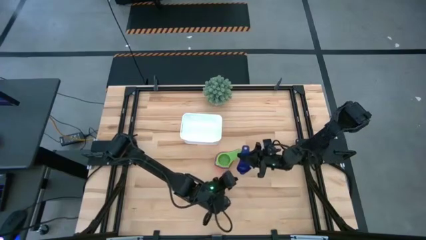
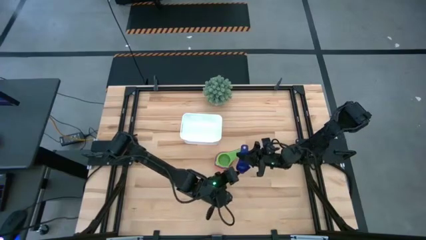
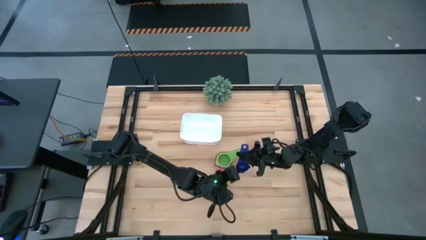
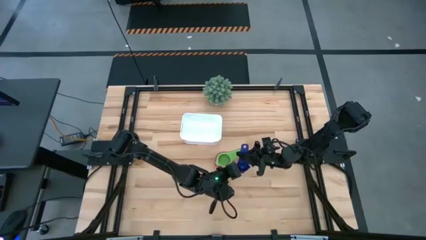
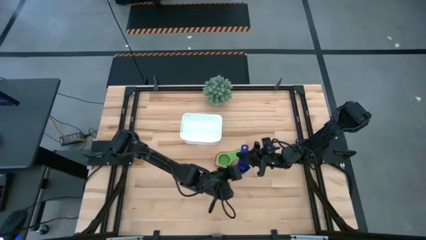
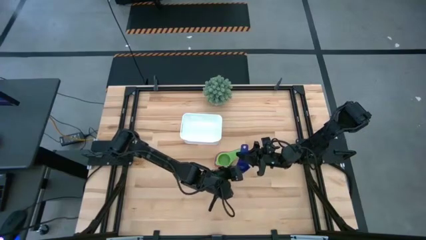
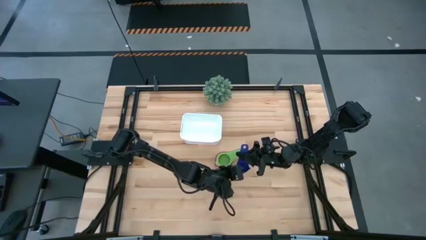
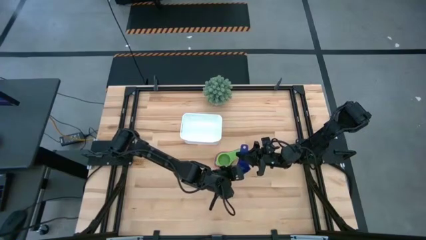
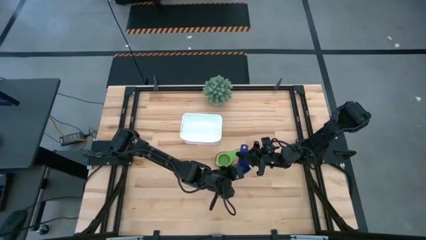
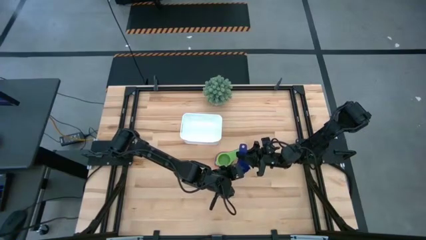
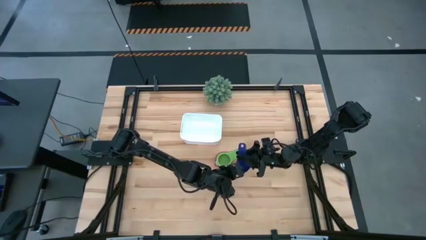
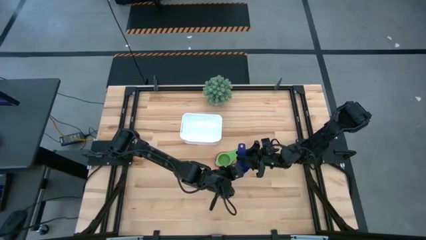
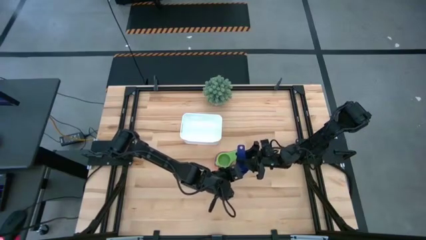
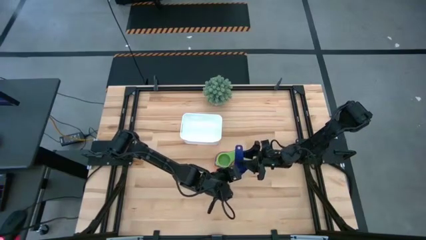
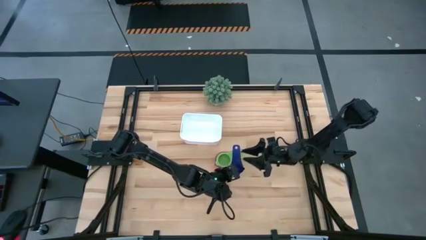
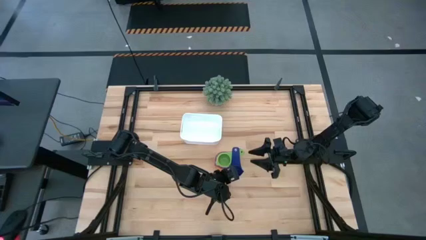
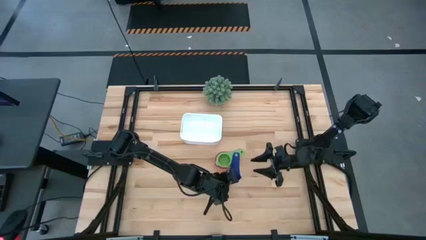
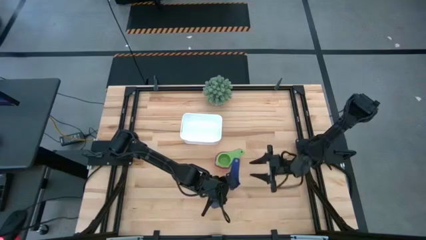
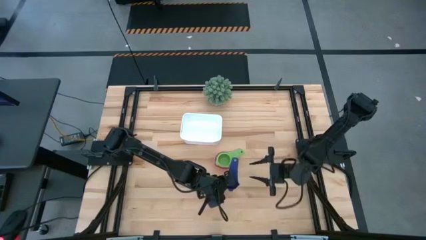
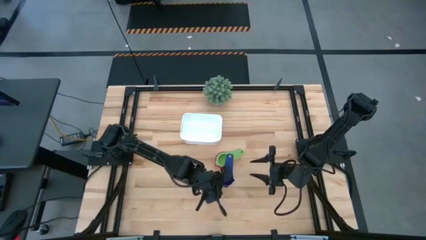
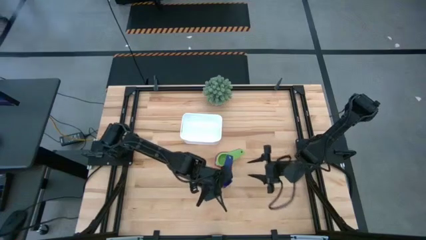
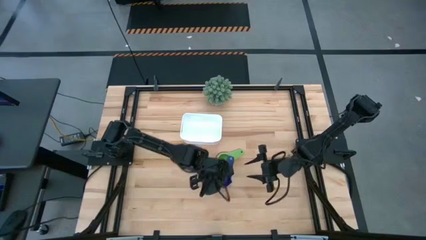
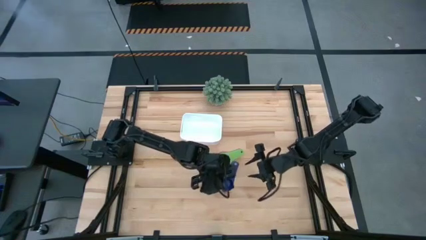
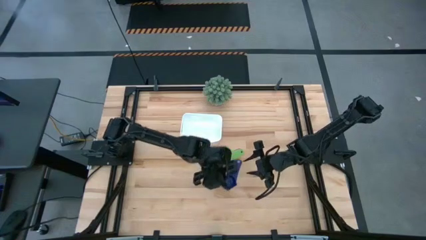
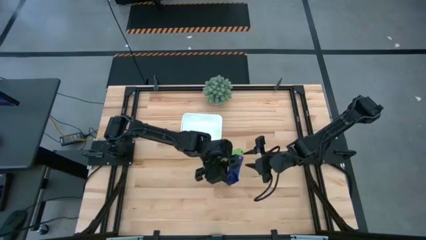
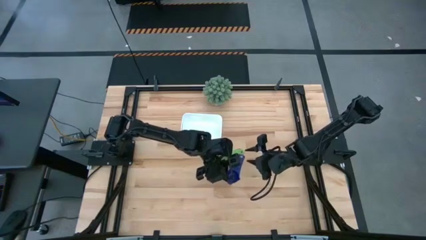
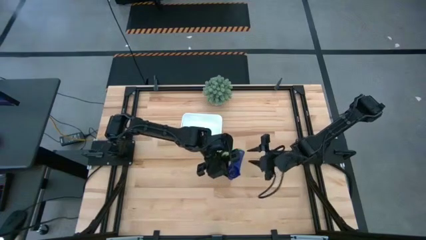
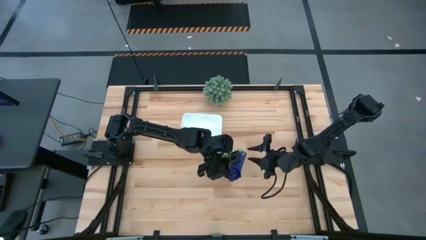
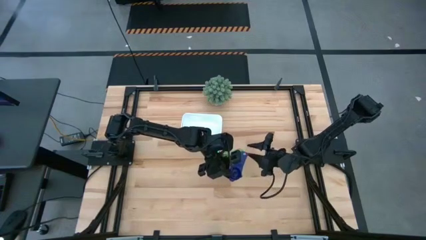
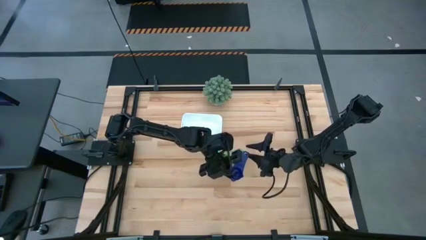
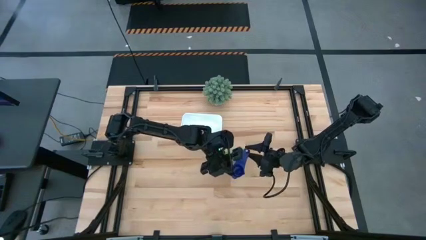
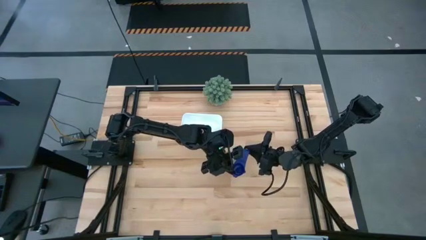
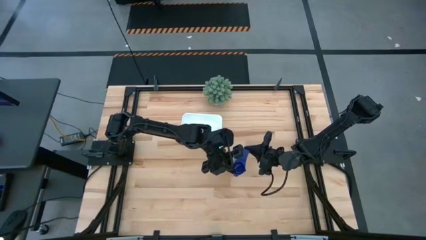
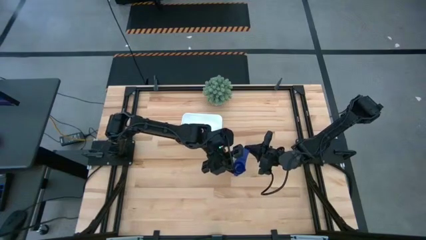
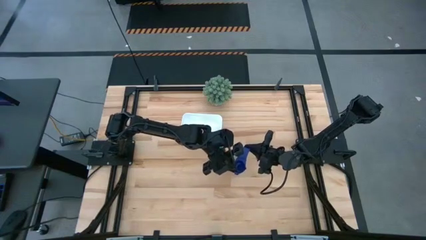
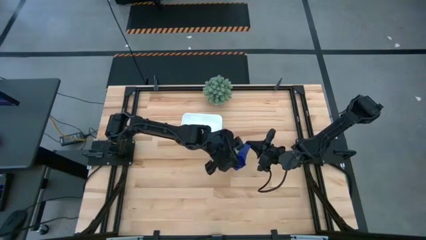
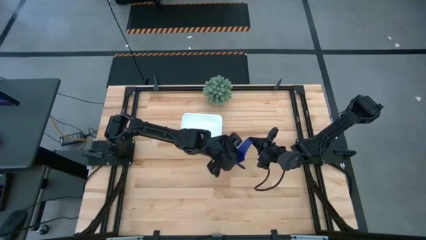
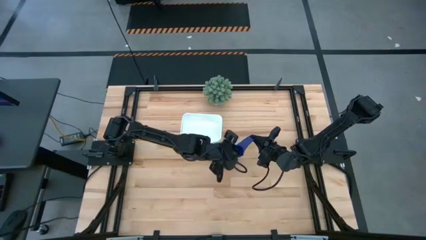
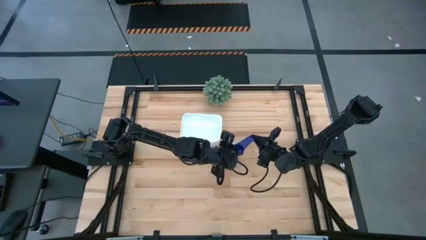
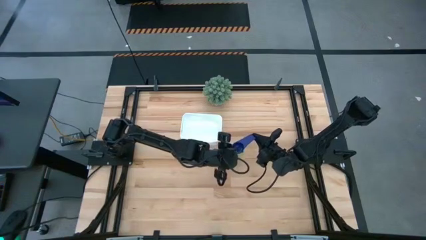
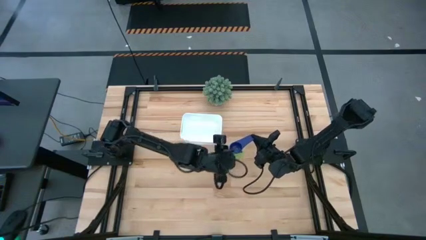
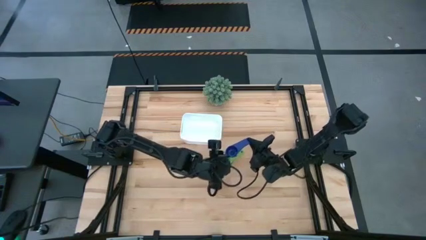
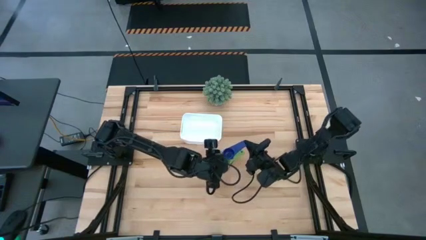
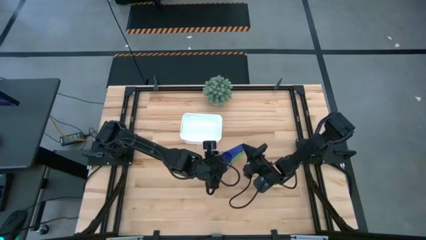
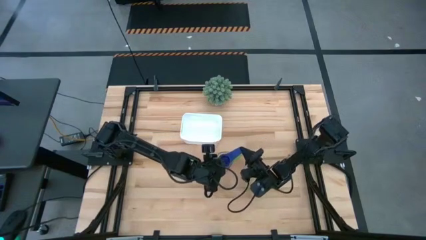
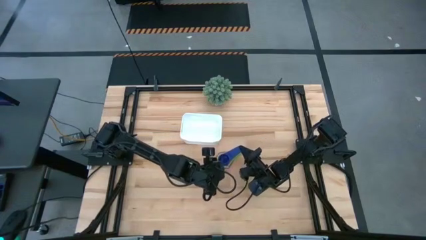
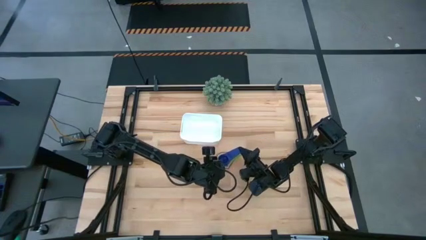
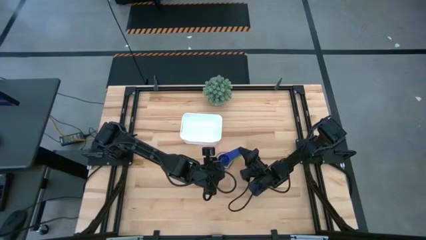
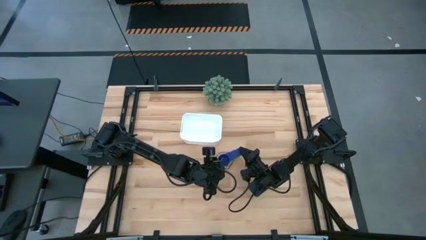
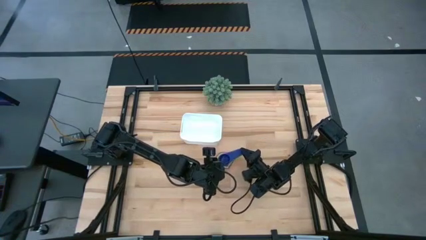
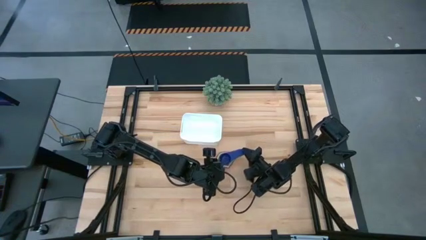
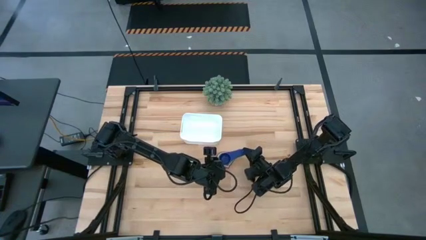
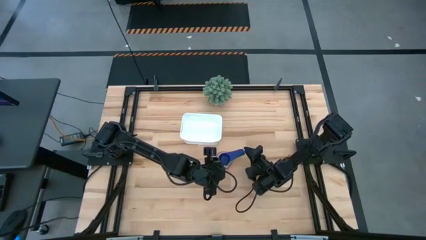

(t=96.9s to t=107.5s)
Task: Nest measuring cups in basket
Stack the blue nesting cup on the green nesting cup

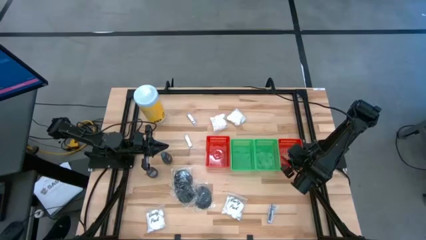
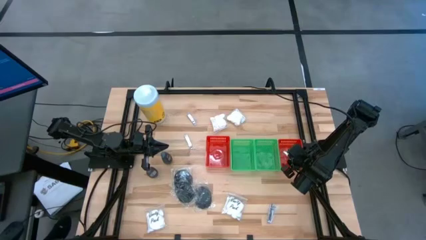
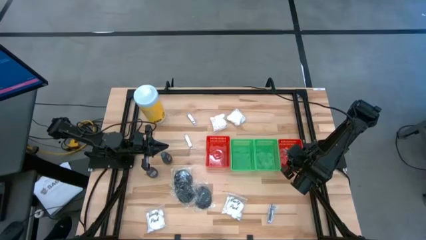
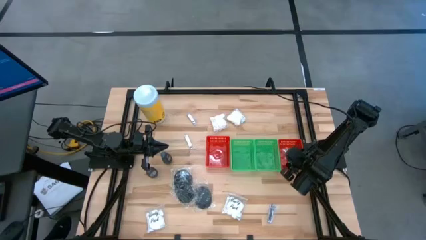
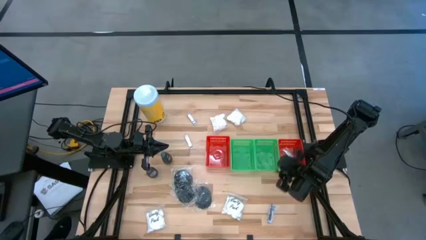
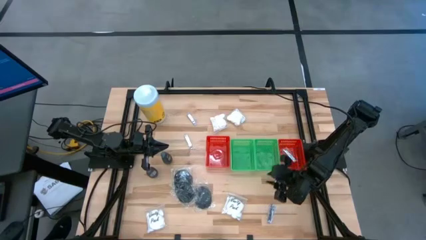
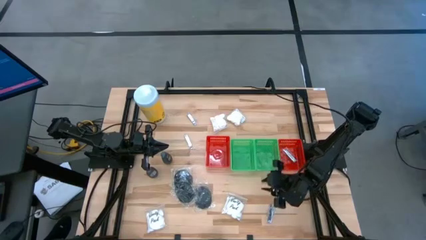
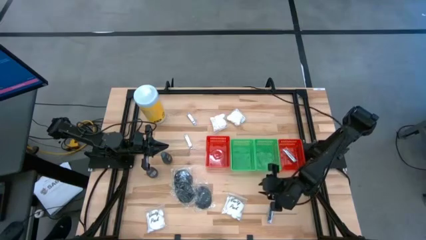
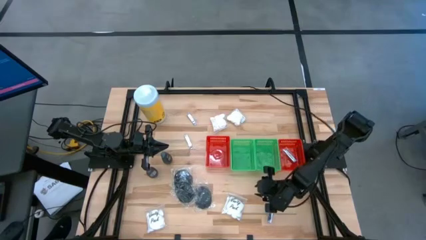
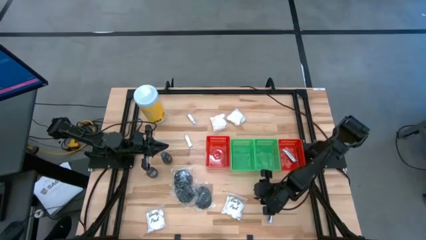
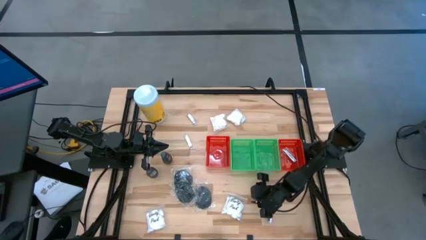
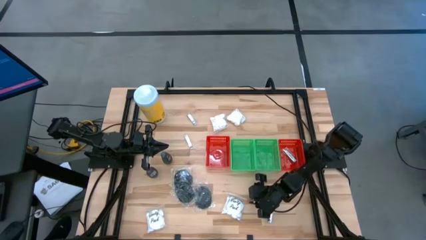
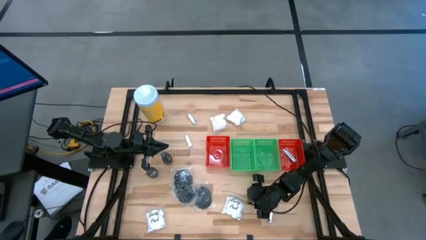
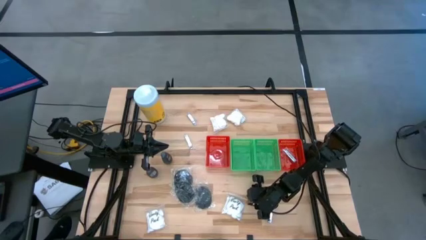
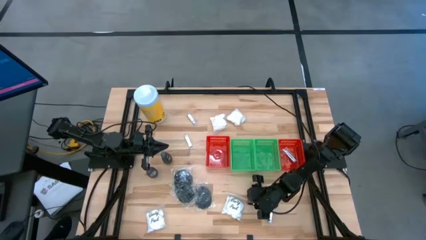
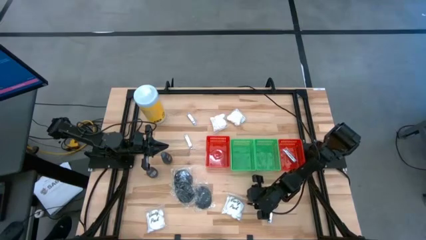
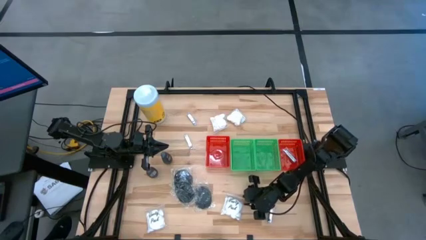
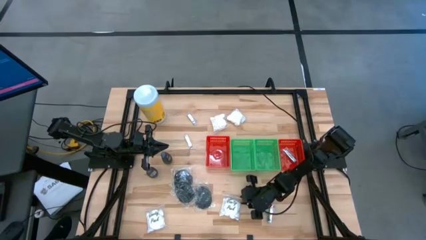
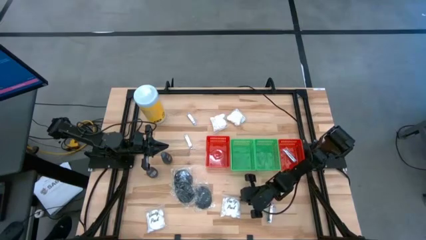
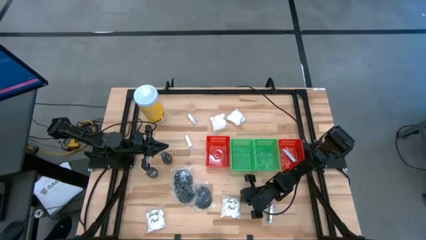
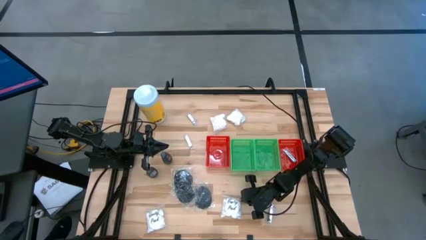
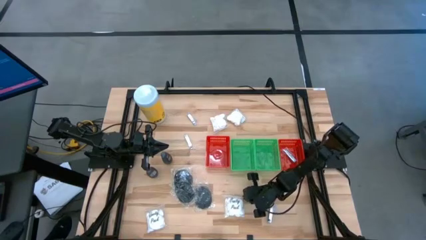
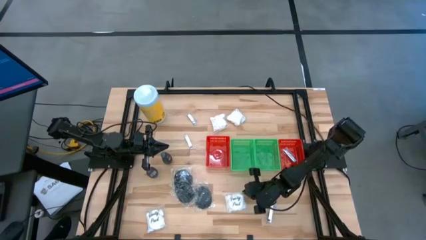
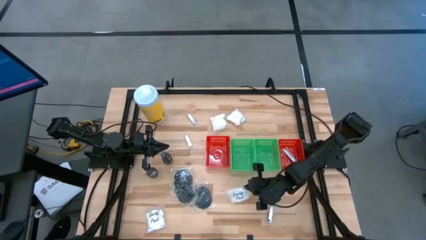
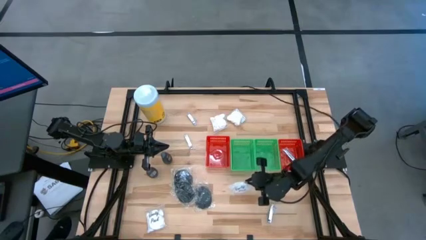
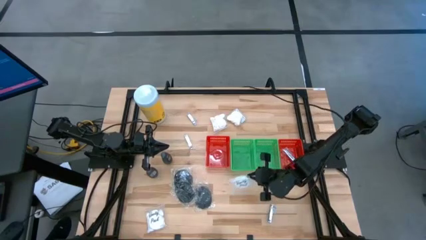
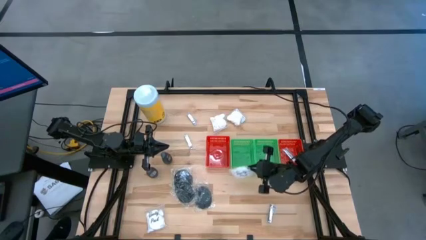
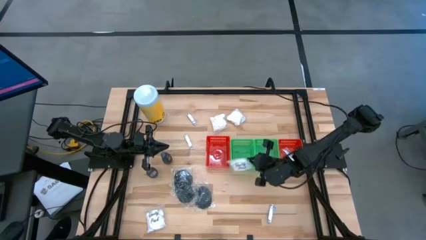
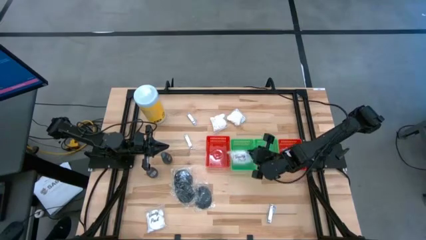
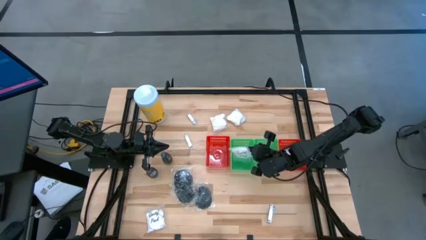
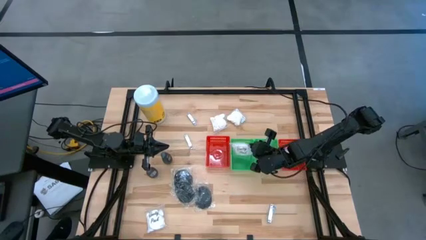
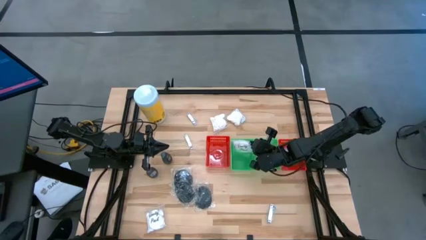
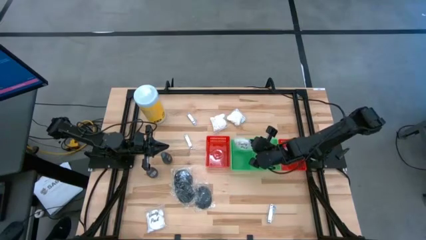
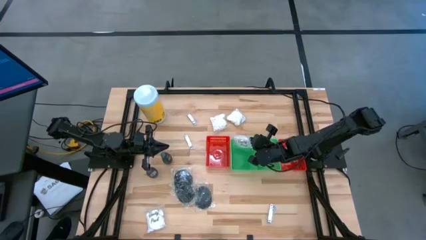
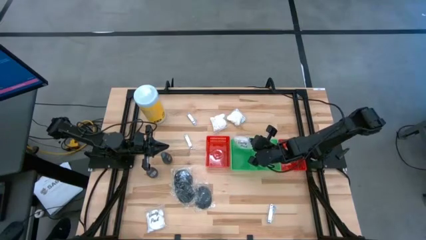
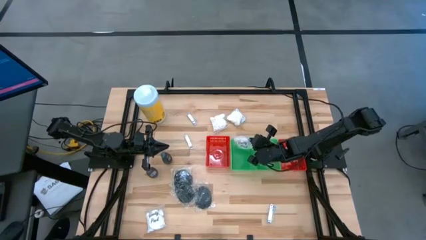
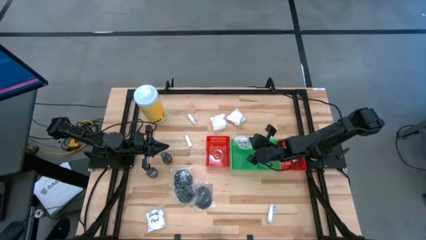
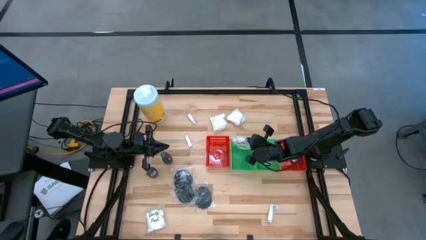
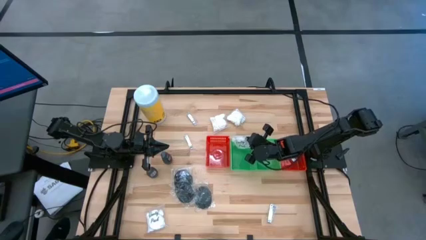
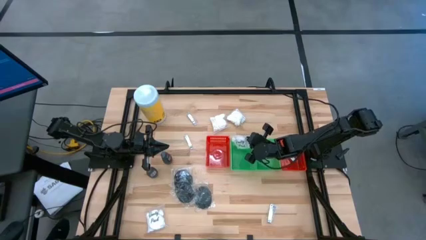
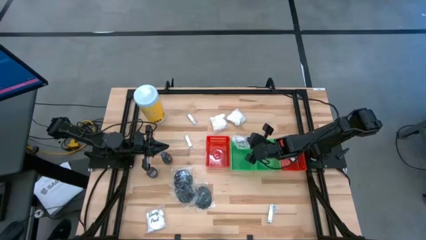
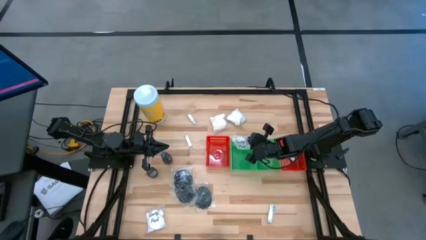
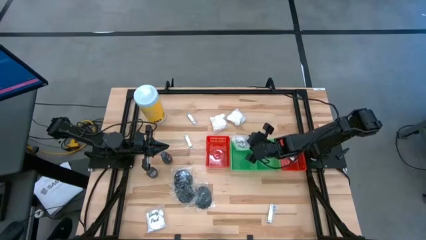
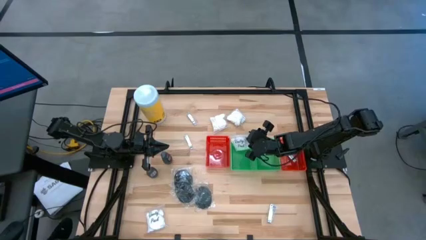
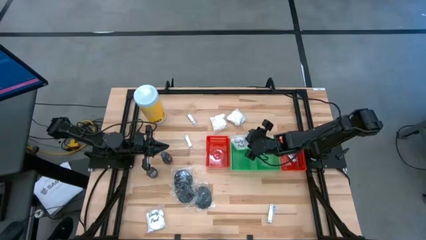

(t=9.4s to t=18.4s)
Task: Pick & Place Travel size toiletries
Put the cotton pack into the left green bin
